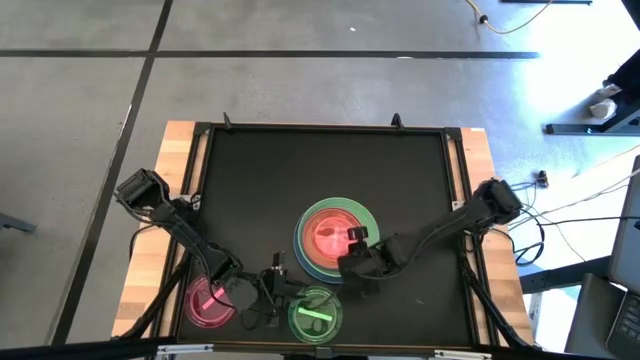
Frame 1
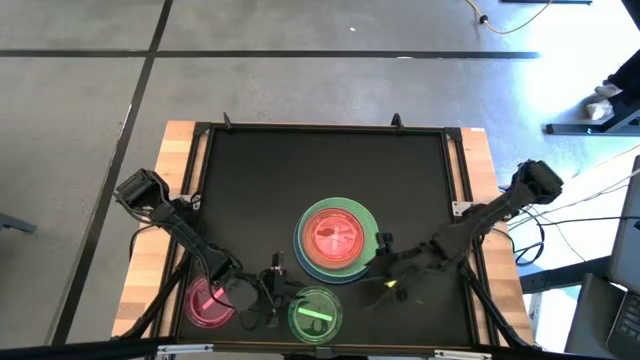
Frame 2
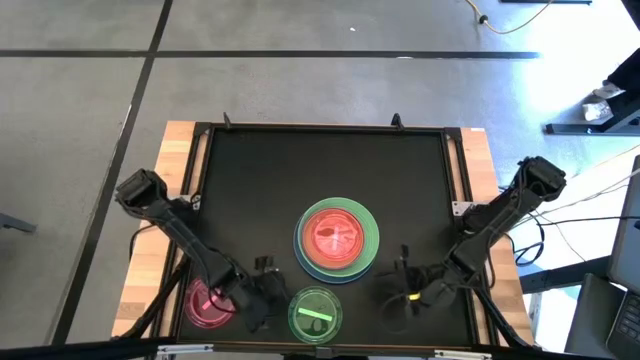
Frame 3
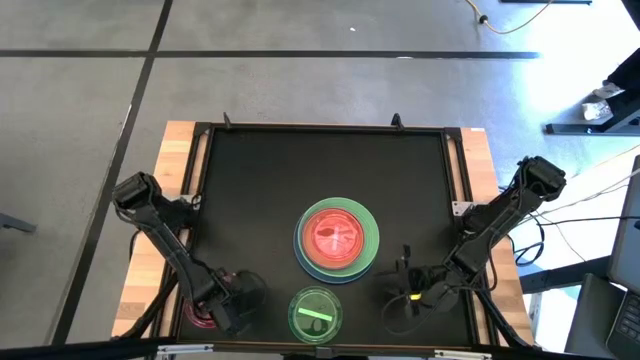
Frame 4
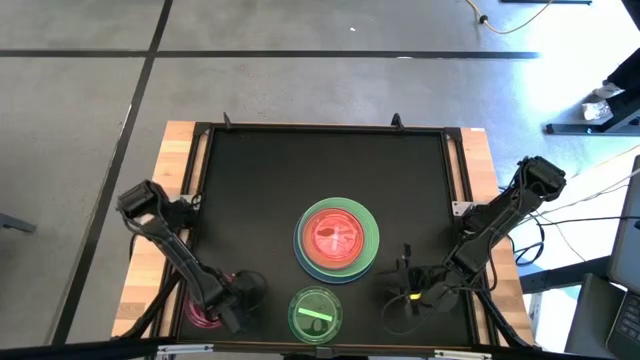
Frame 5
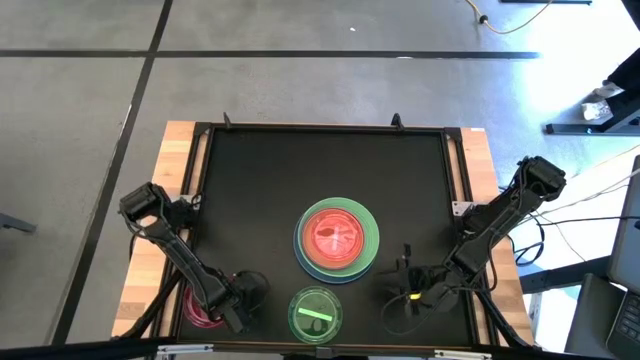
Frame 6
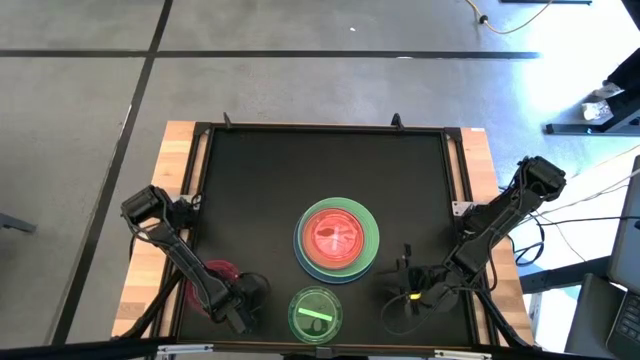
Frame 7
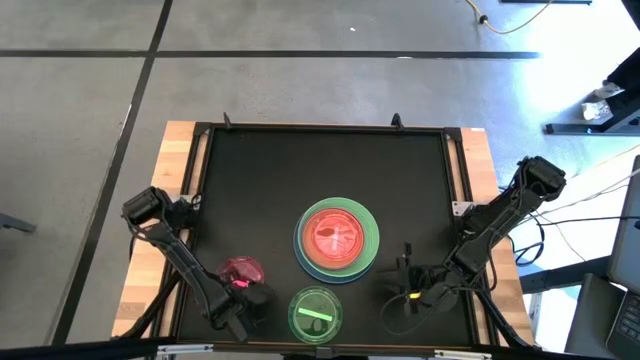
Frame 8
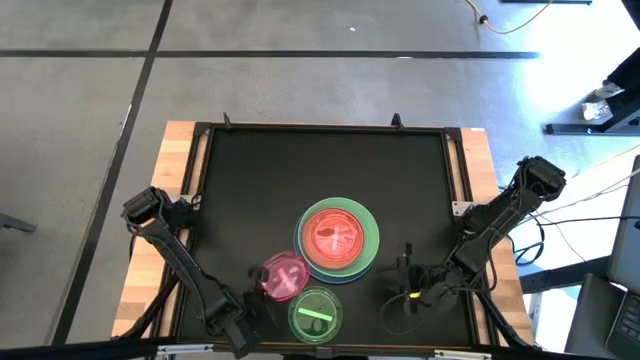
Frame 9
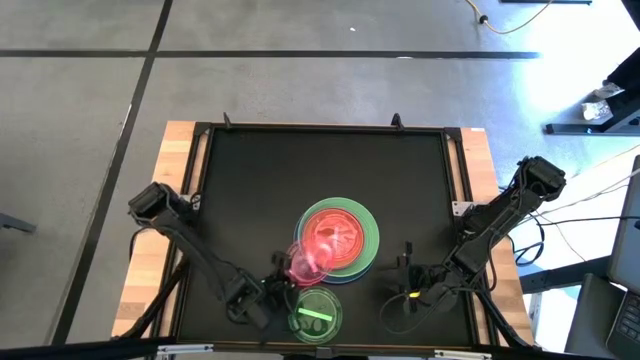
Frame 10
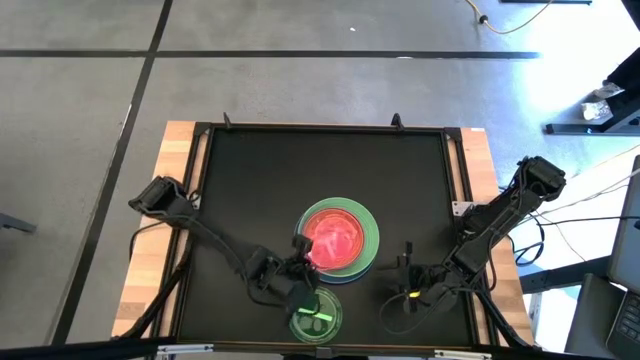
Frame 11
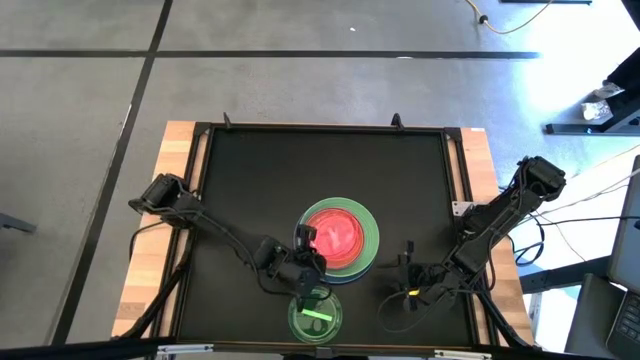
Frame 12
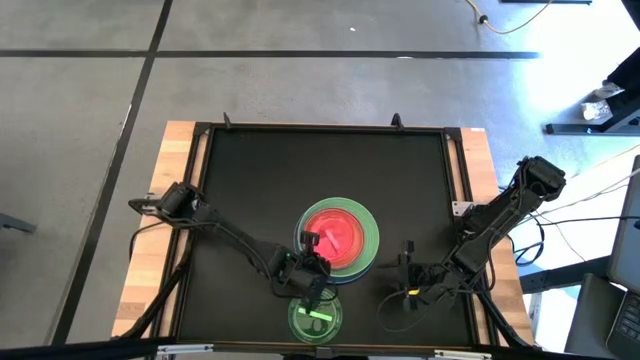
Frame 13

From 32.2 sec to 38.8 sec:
Task: Stack plastic plates
Stack the red plate on top of the red plate

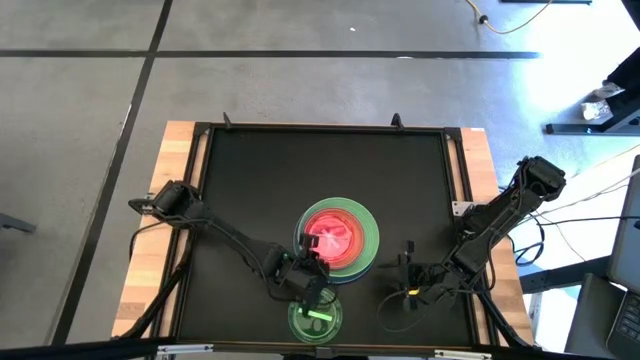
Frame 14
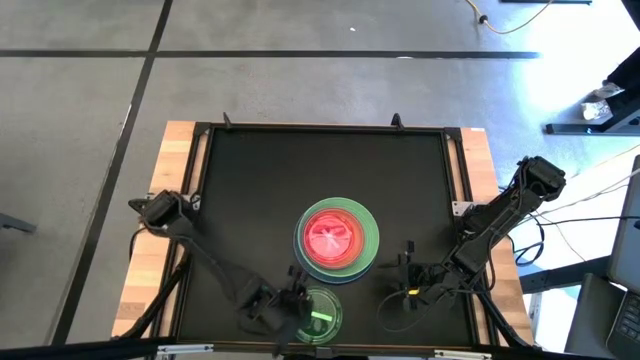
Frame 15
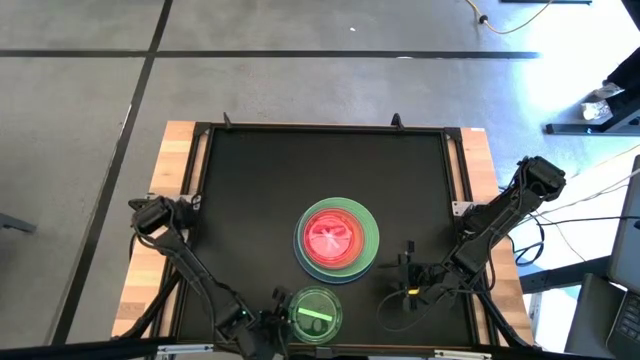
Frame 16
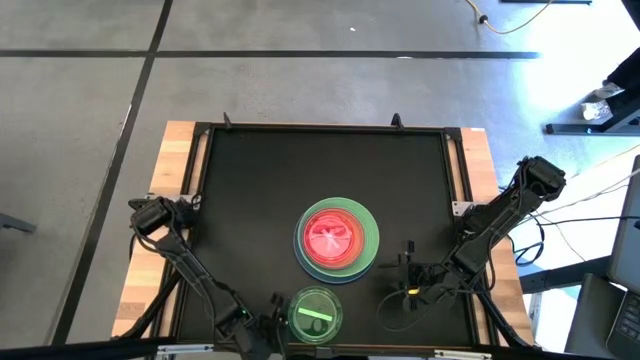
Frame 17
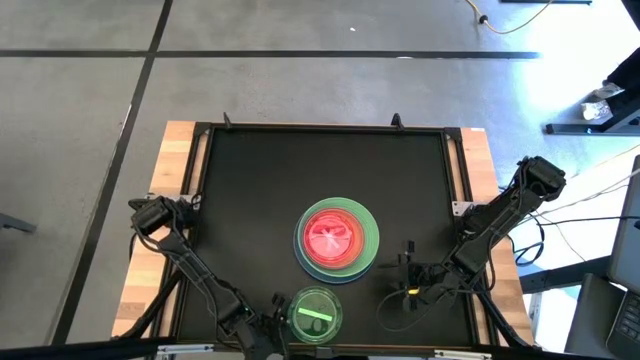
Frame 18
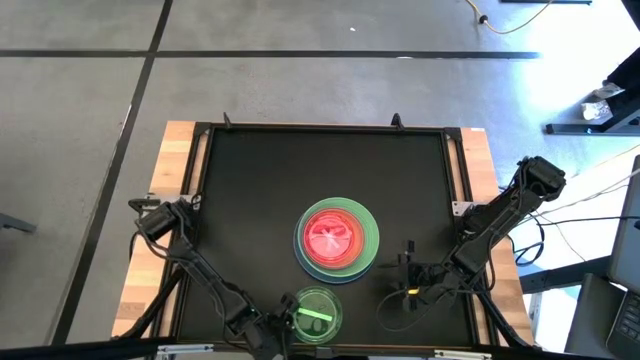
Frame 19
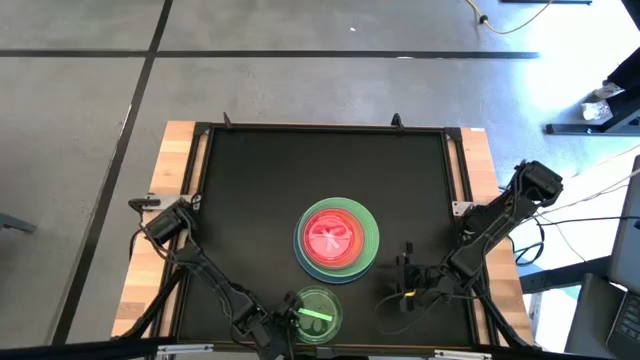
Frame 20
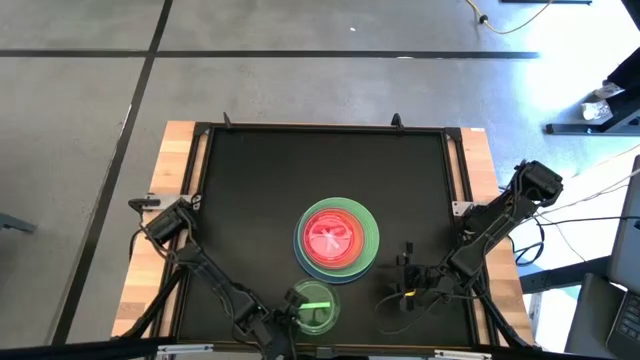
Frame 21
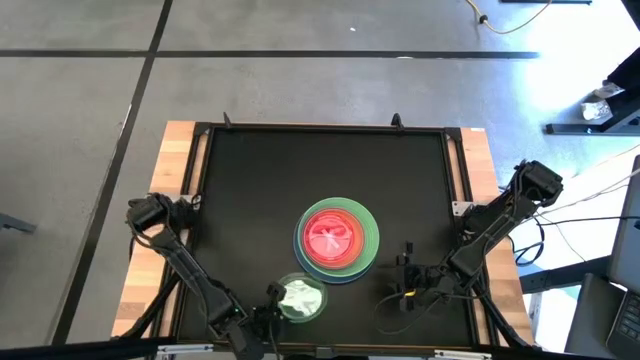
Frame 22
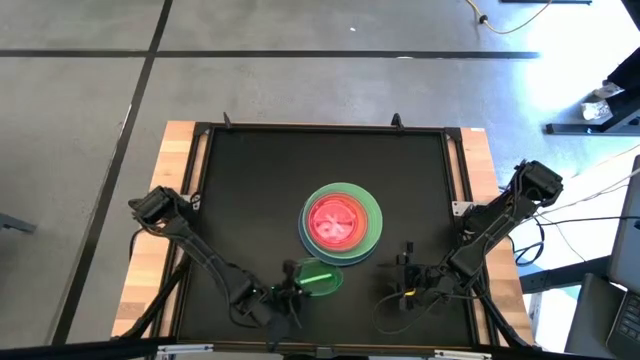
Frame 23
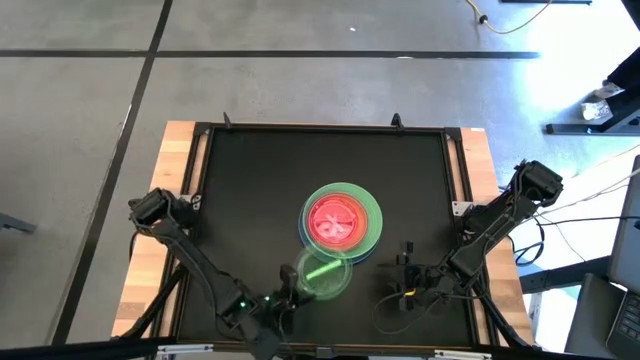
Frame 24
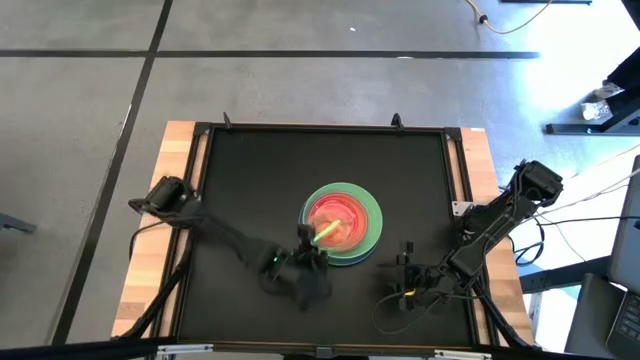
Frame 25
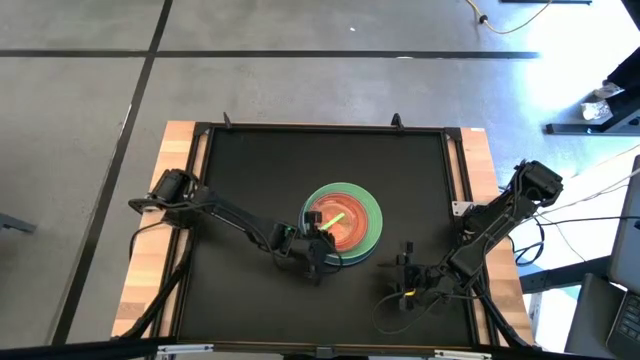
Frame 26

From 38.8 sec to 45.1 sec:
Stack the green plate on top of the red plate

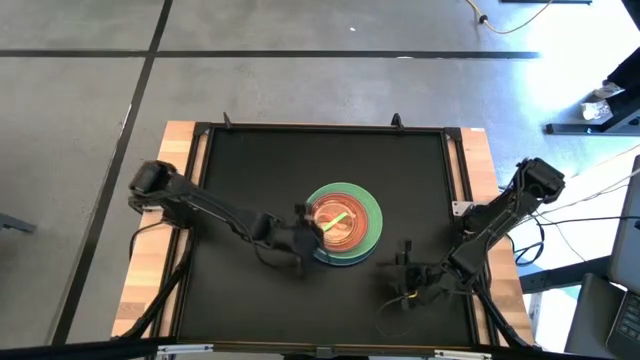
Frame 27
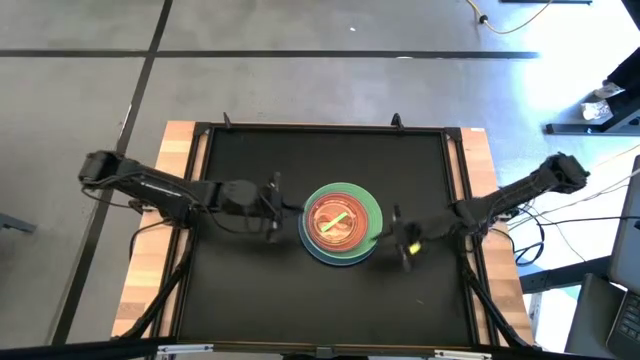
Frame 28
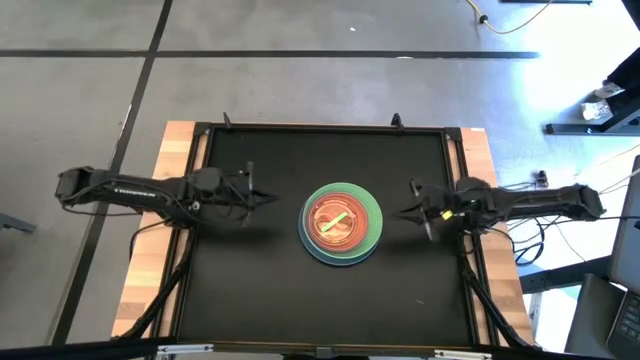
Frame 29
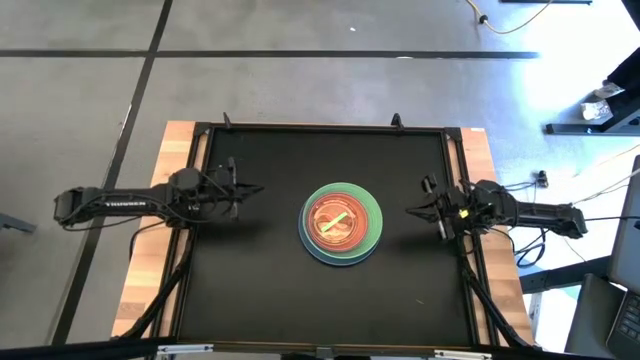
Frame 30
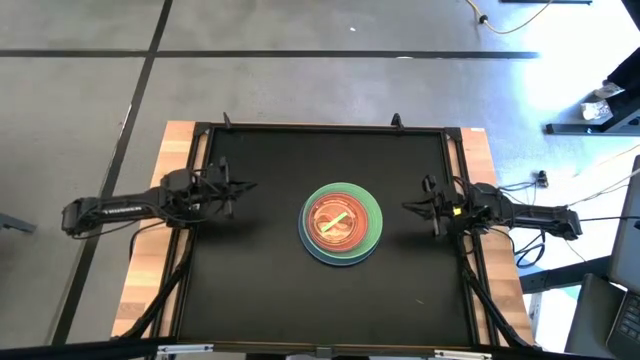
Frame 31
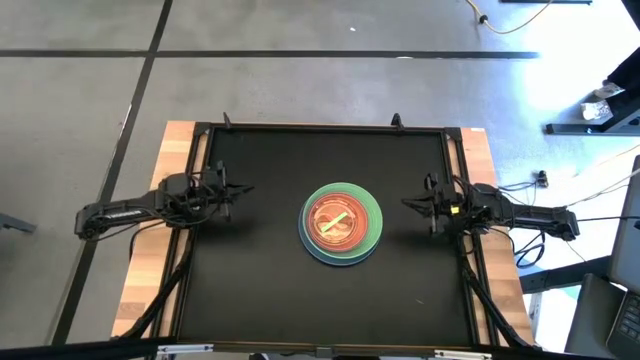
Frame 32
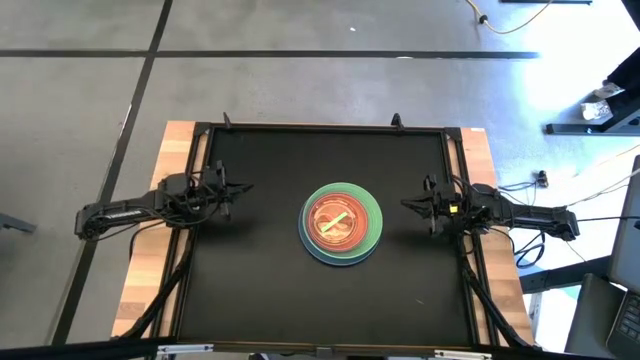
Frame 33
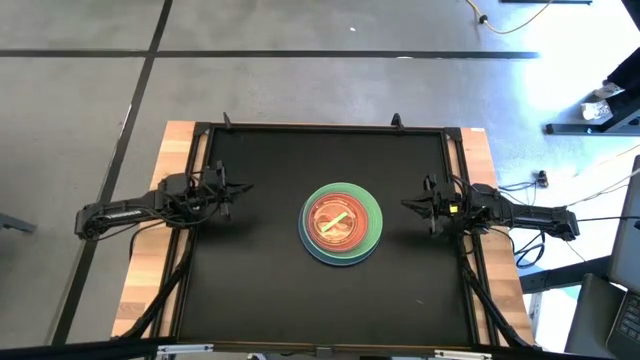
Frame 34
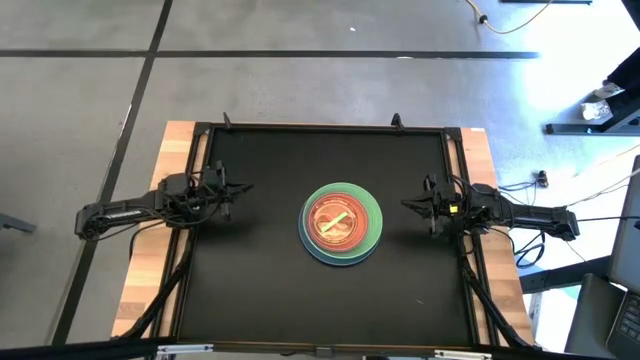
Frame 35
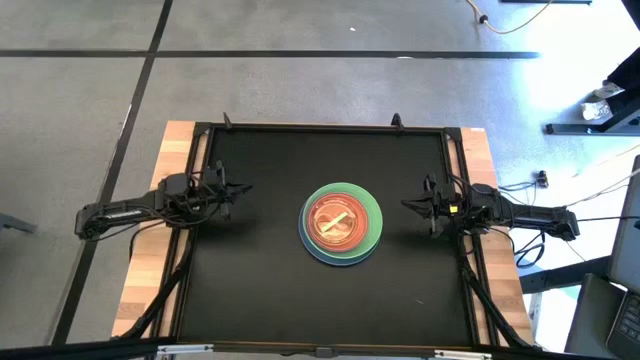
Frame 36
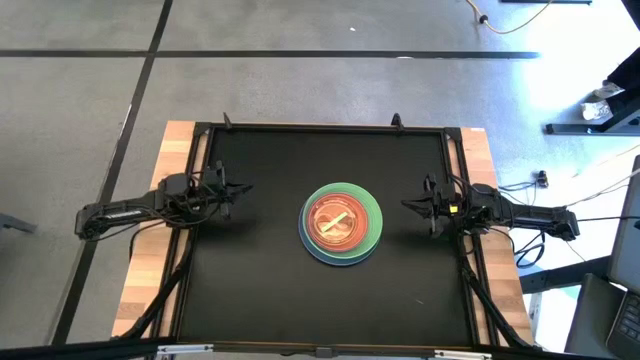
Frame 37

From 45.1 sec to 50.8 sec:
Return to Home Position

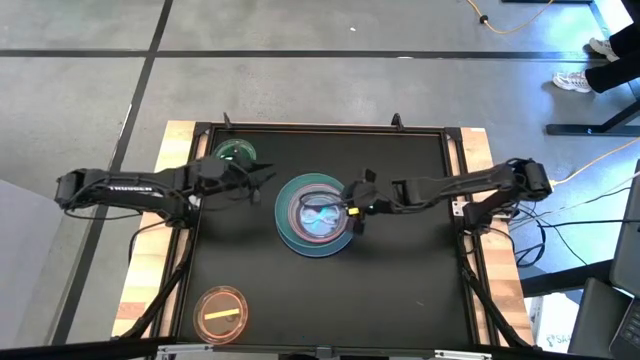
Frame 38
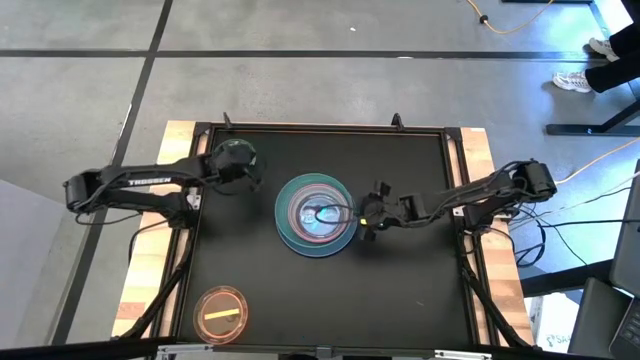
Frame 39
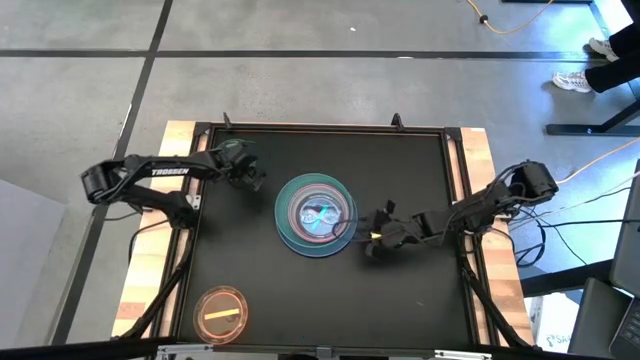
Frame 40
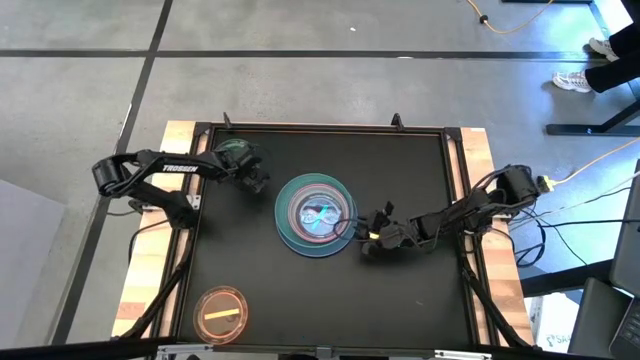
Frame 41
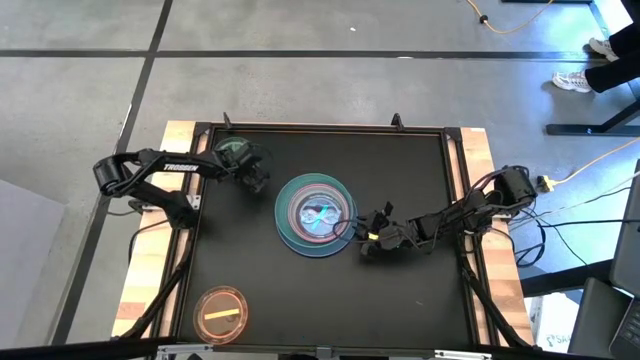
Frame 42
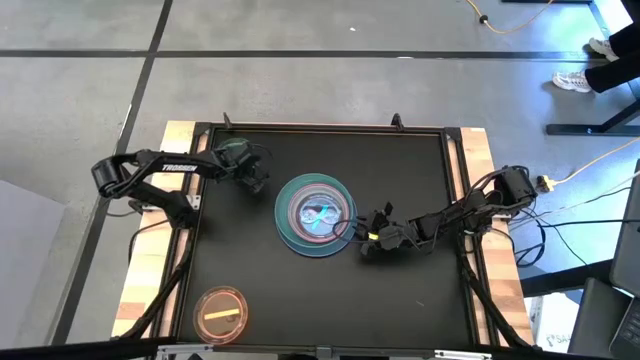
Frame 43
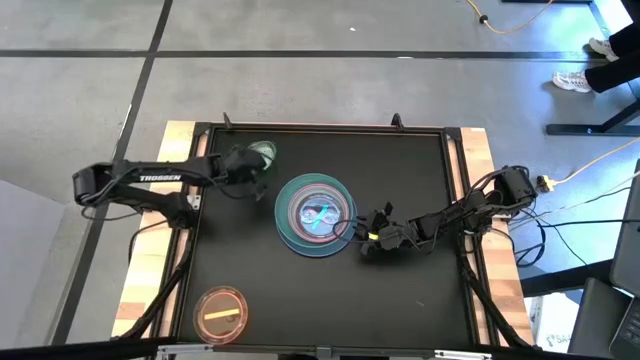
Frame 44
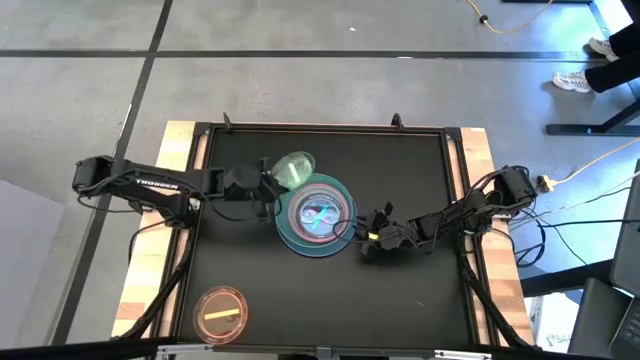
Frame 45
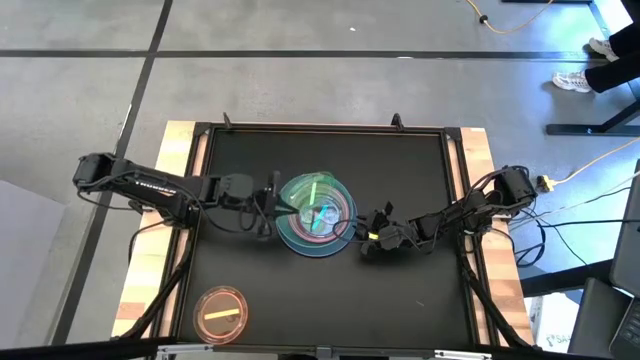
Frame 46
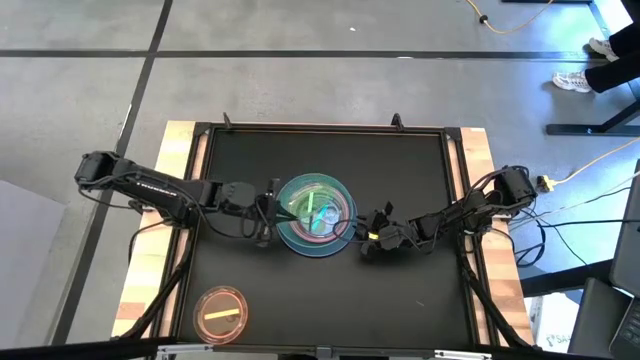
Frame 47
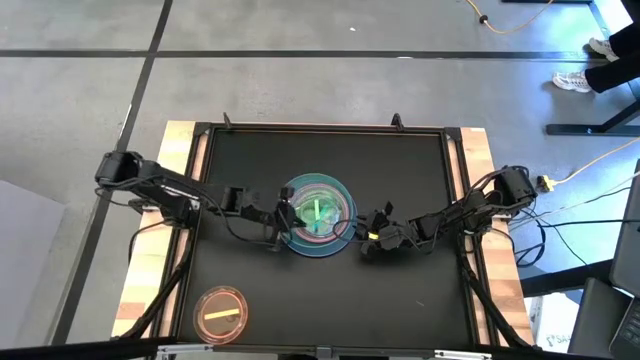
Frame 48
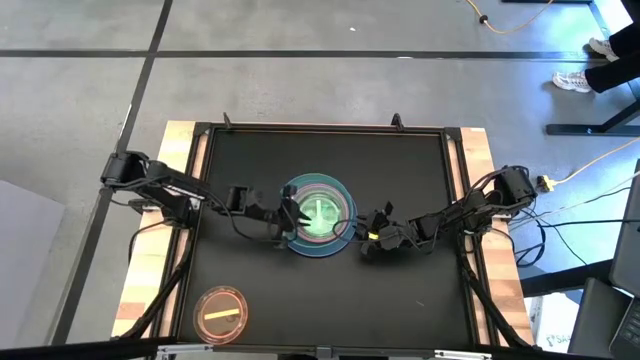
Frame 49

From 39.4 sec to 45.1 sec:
Task: Stack plastic plates
Stack the light green plate on top of the light blue plate
